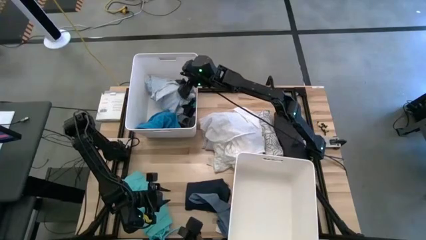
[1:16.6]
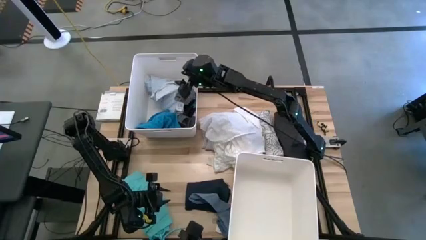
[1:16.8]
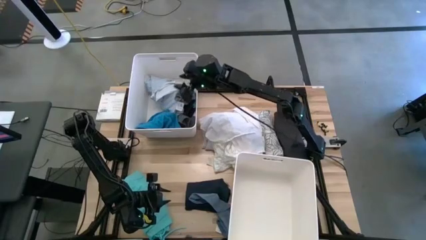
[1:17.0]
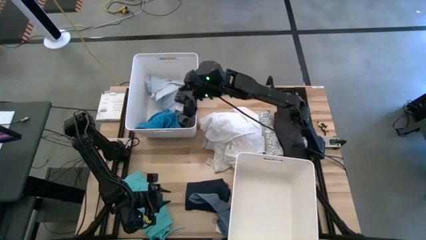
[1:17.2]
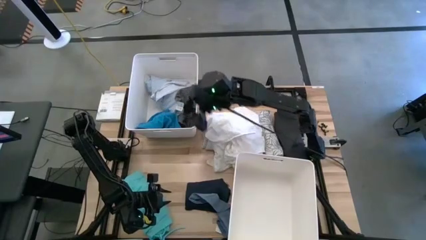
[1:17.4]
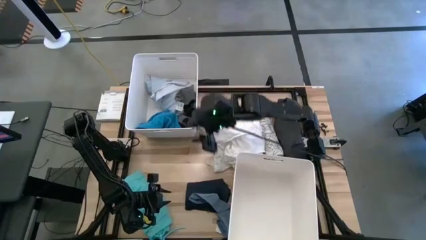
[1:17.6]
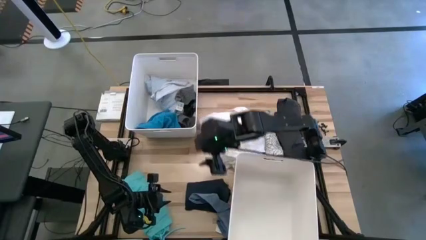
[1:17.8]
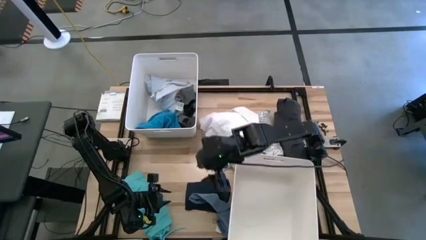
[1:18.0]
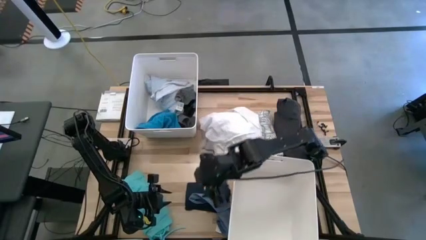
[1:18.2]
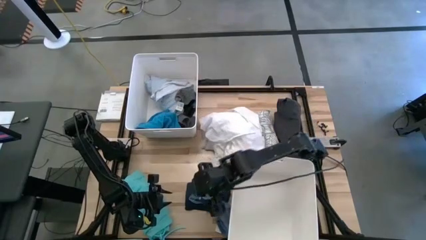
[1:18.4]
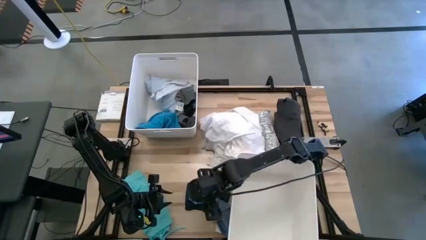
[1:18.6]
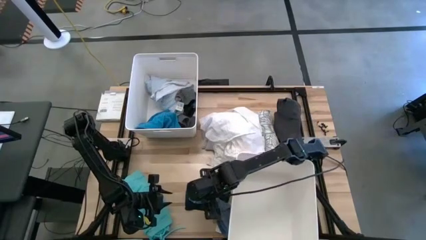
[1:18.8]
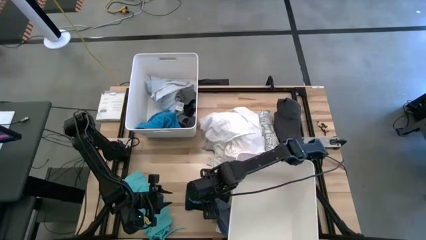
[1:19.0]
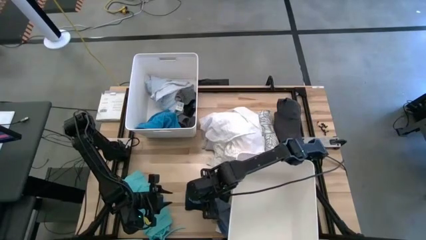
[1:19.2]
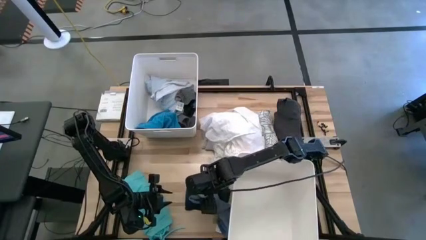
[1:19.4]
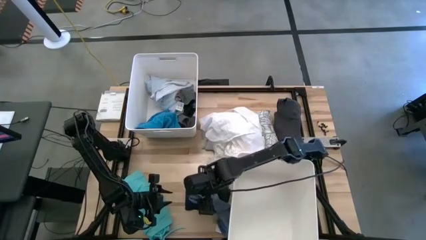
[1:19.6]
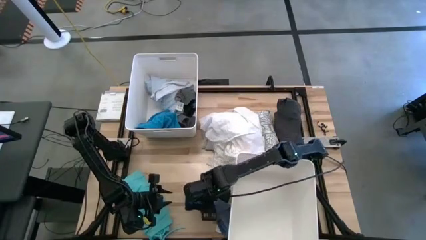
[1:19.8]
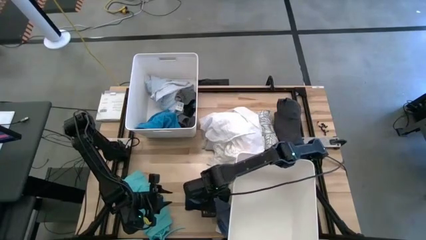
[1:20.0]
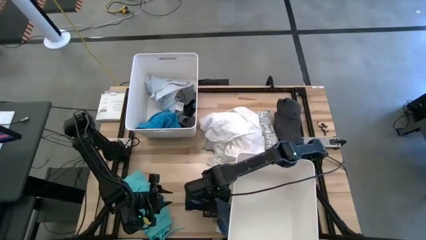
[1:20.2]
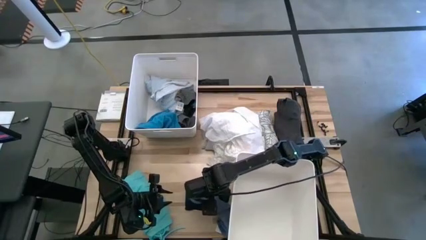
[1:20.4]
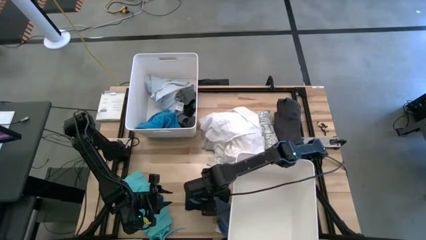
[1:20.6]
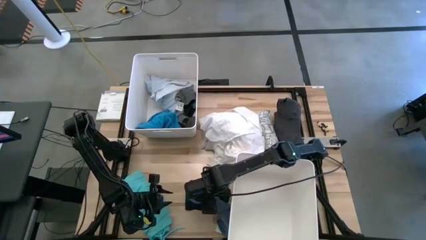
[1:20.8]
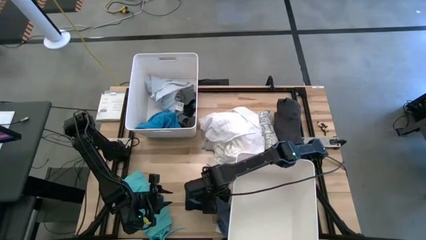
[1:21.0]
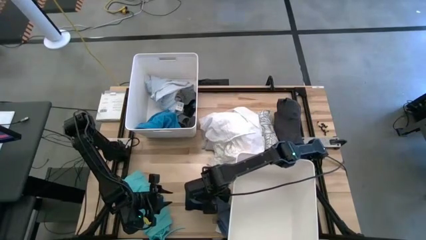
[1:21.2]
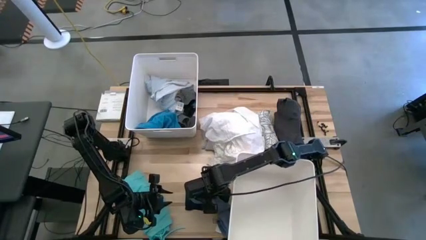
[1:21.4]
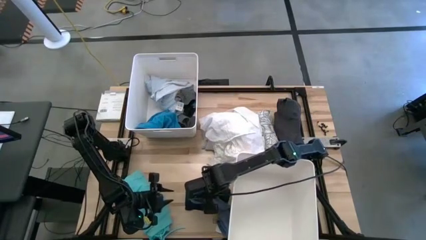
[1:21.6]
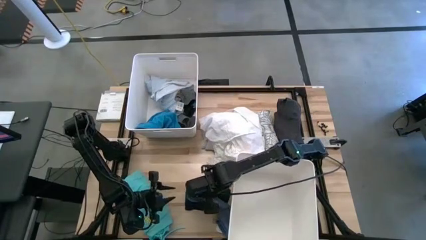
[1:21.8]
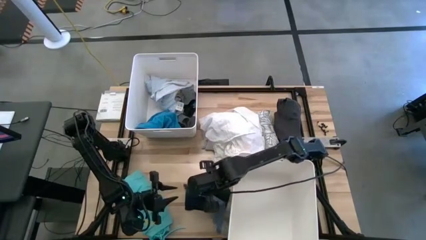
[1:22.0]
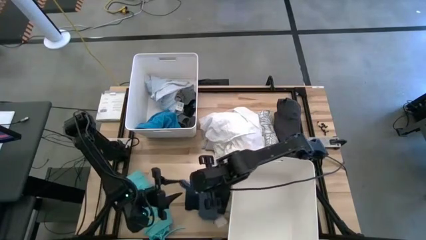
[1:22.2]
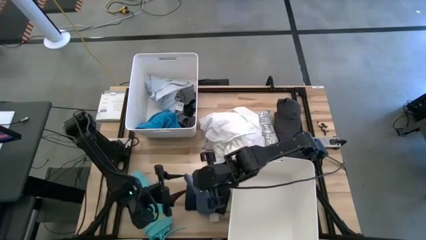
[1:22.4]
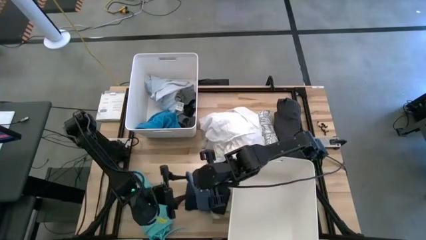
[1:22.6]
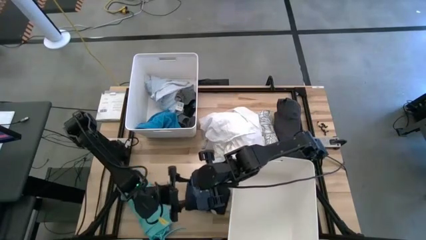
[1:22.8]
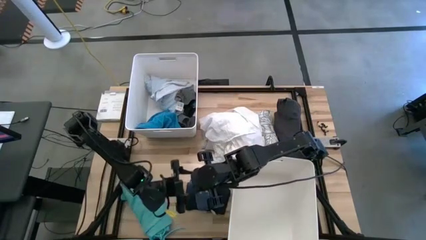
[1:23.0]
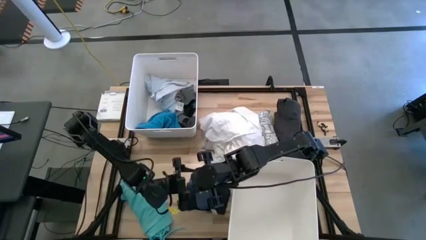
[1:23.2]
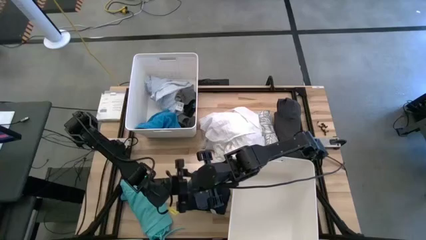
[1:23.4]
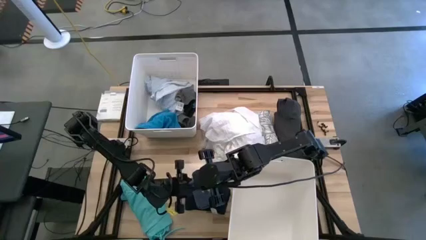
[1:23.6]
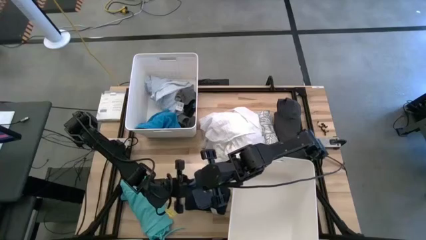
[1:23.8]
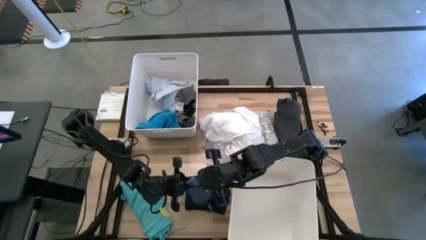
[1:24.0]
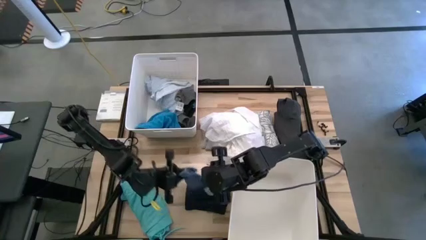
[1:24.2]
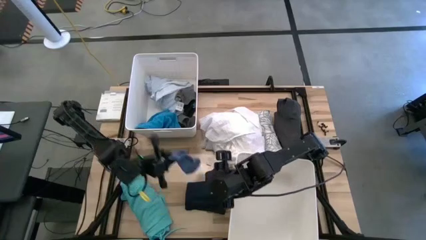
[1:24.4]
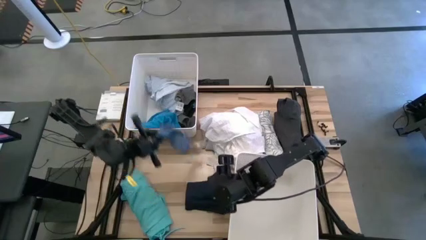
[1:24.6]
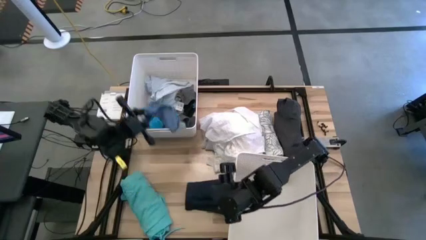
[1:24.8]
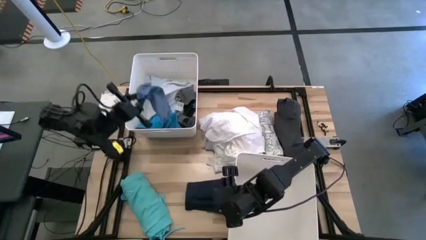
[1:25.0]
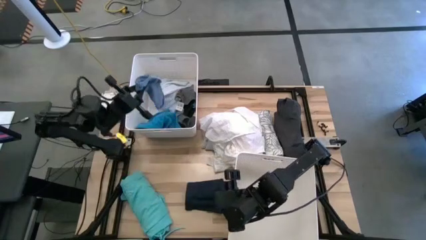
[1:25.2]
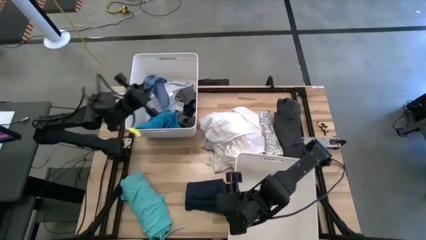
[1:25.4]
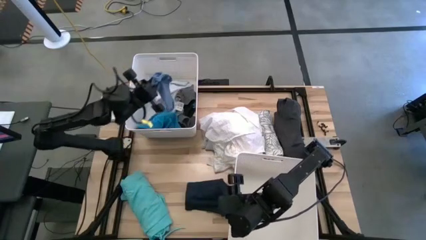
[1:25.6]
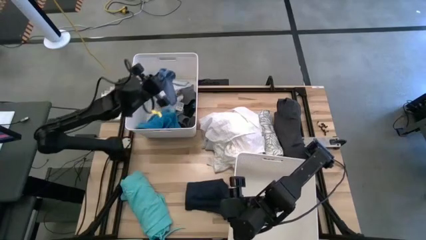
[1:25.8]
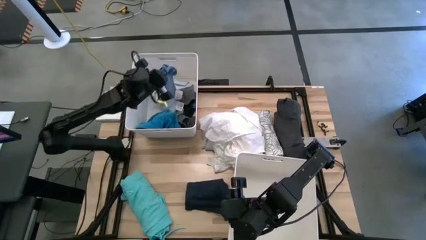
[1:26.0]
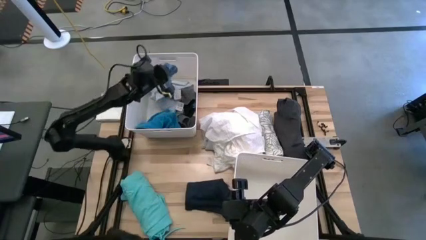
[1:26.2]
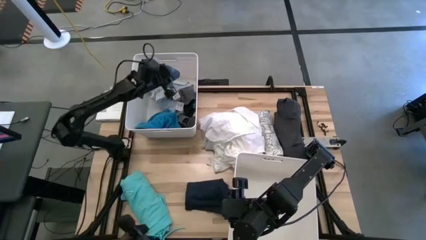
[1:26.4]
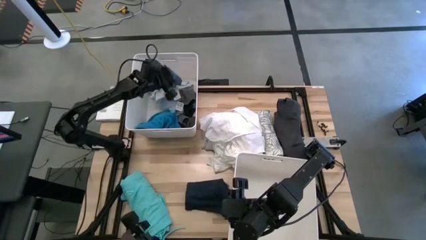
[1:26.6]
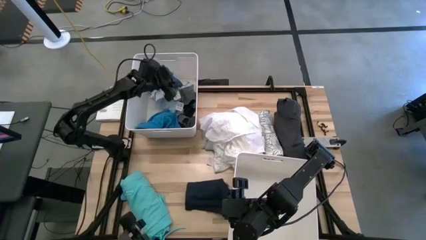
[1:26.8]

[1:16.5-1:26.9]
Task: Sort clothes
Put the gray sock into the top white laundry bin

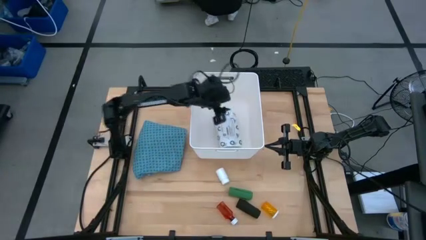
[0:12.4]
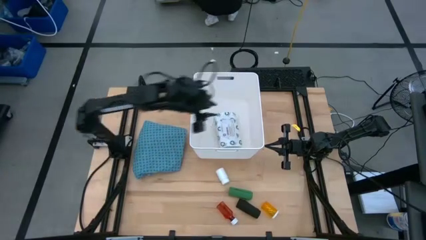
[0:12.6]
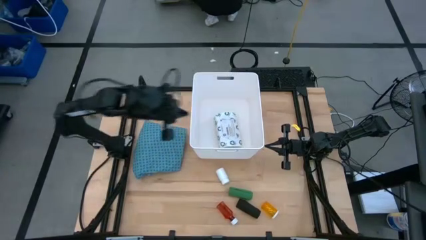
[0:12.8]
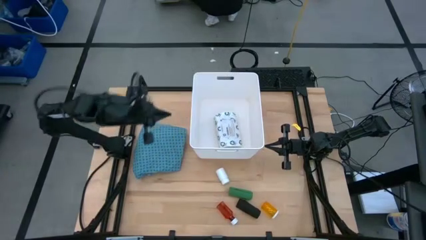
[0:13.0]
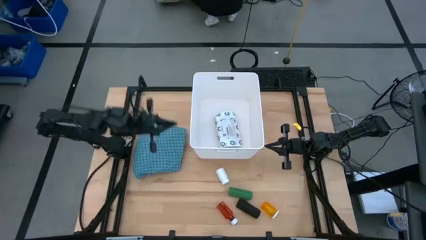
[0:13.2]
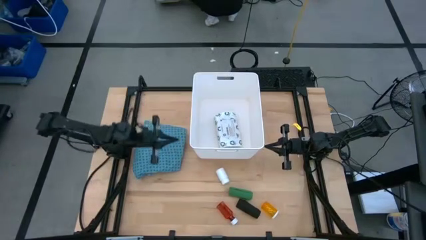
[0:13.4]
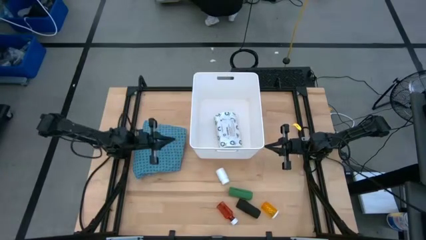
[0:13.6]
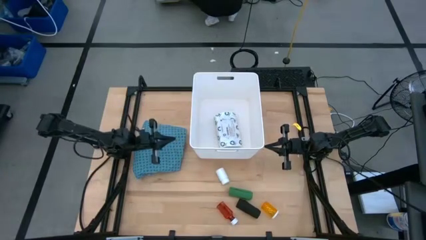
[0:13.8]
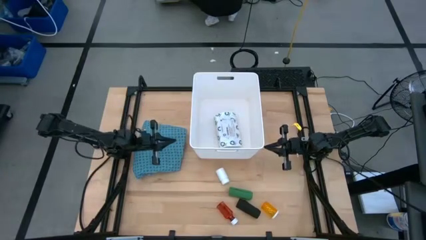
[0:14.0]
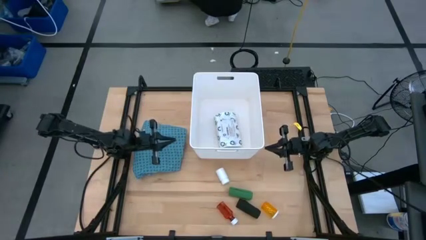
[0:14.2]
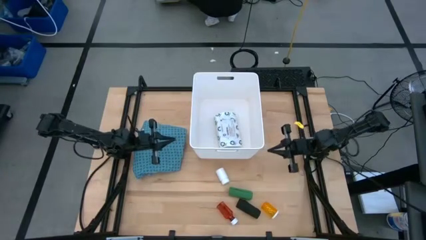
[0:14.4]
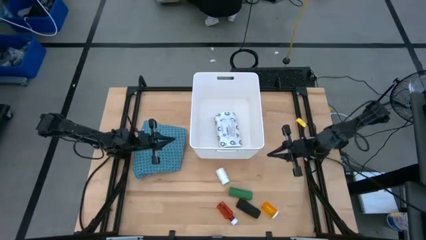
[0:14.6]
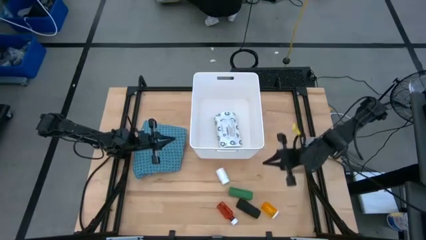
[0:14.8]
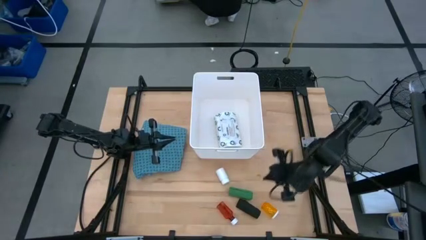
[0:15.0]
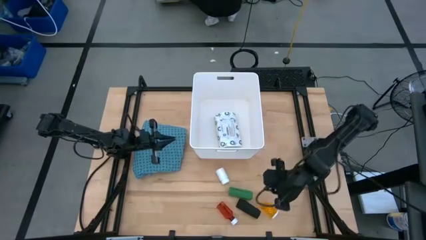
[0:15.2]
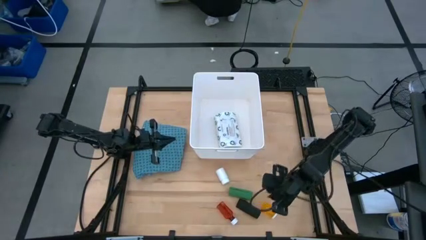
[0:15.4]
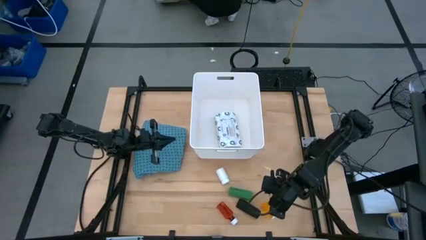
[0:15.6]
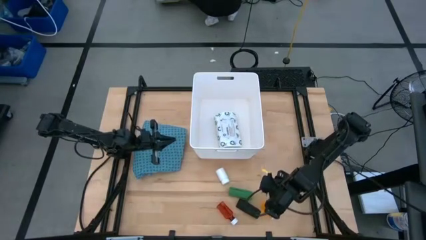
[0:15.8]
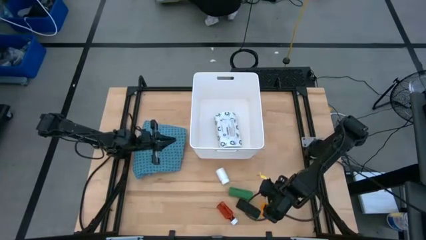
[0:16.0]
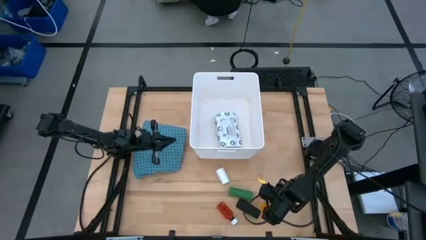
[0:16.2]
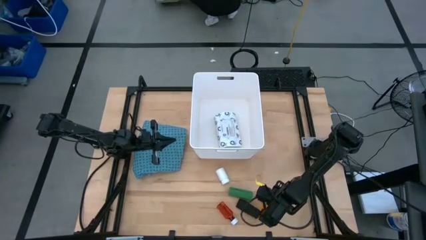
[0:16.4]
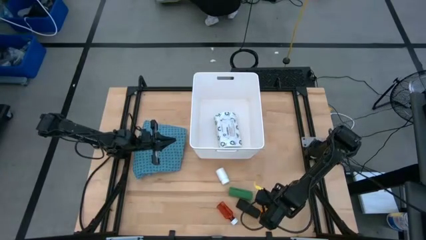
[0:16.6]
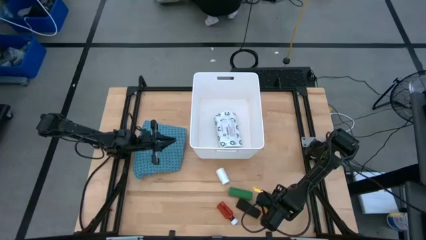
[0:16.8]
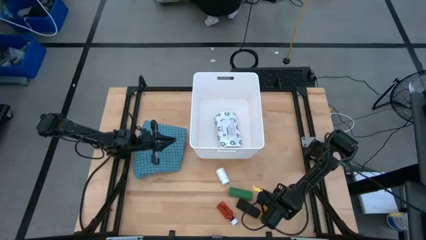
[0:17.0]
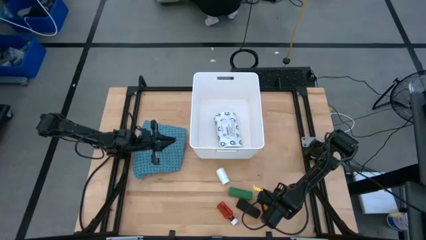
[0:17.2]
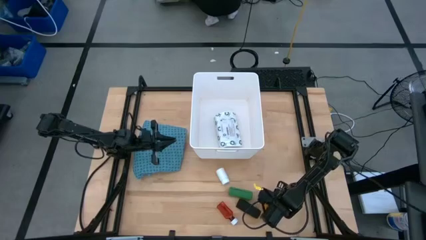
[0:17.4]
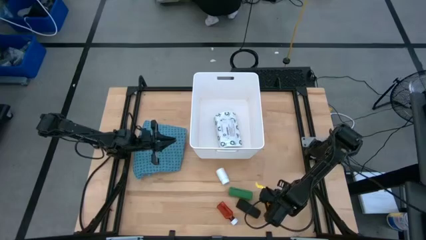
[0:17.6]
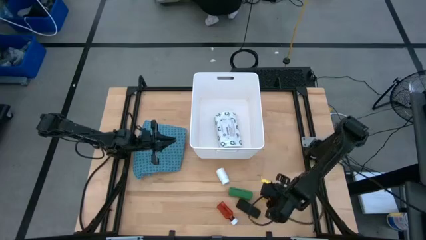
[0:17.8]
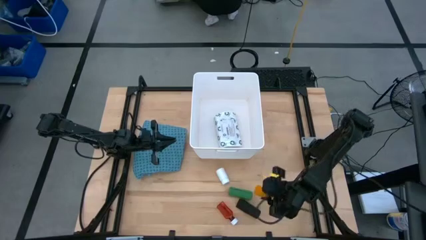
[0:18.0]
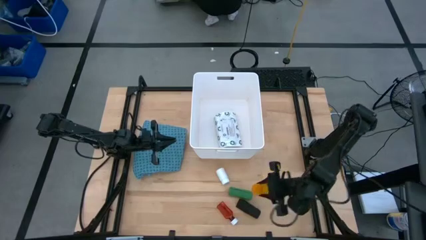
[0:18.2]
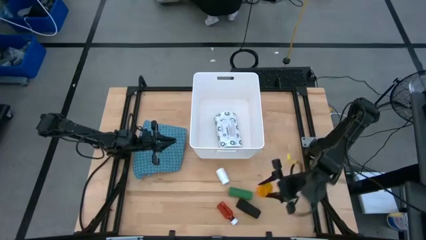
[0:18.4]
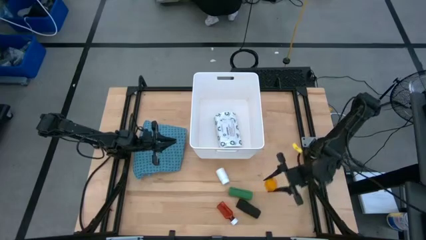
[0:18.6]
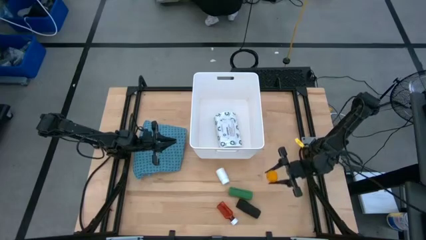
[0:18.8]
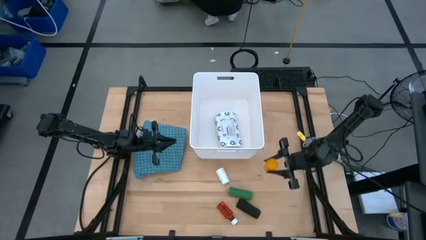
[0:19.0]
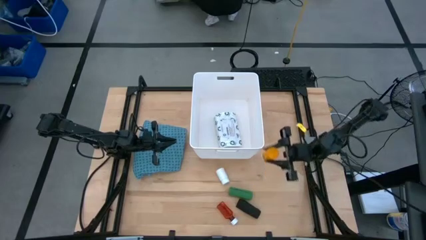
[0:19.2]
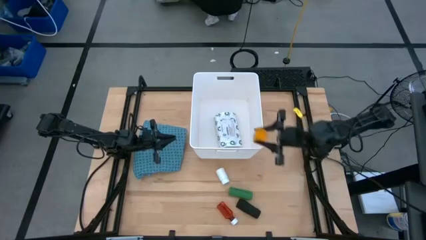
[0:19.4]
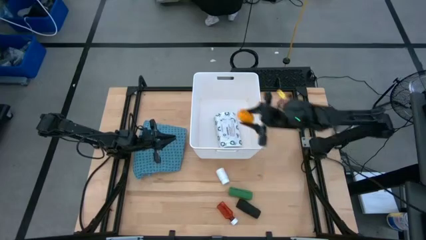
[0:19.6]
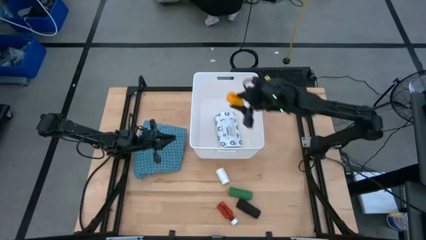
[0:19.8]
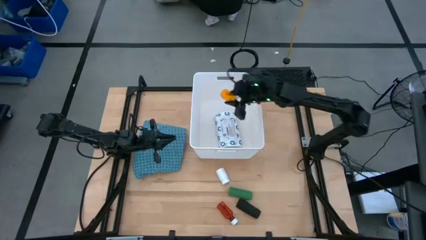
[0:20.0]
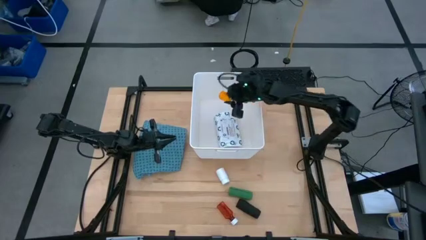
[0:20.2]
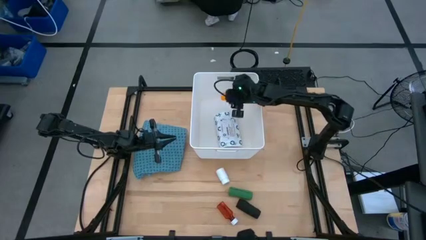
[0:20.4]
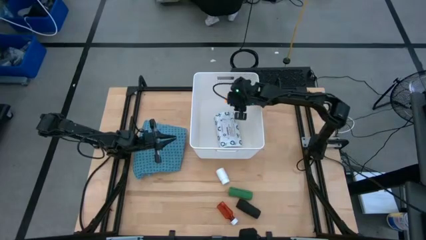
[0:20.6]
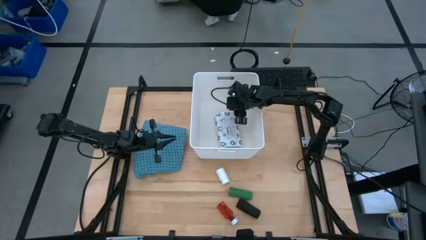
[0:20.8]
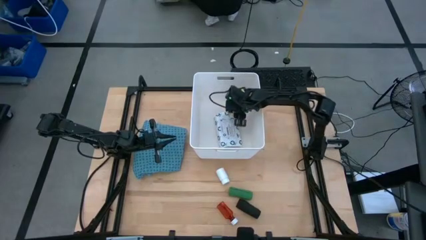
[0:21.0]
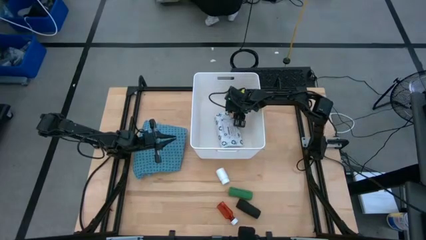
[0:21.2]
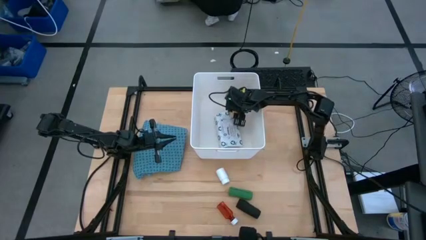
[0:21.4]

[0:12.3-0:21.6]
Task: Pick & place medical supplies in basket/bin
Put the orange pill bottle into the white bin
